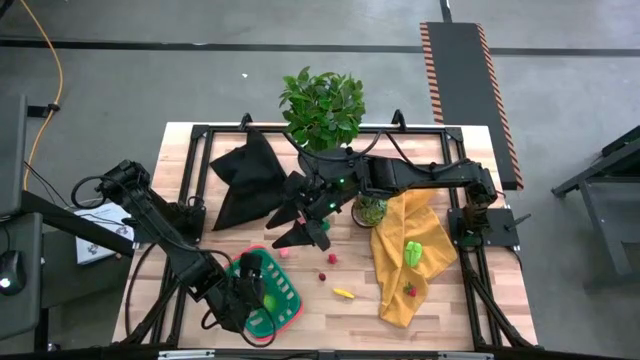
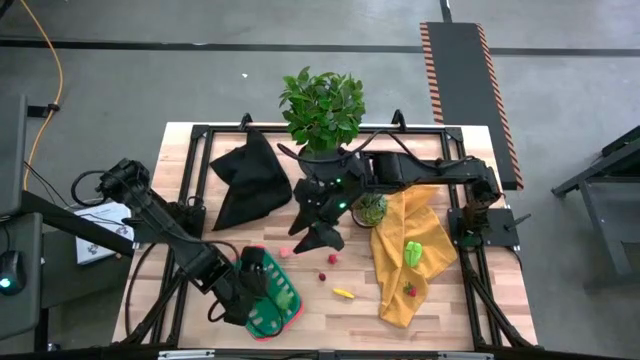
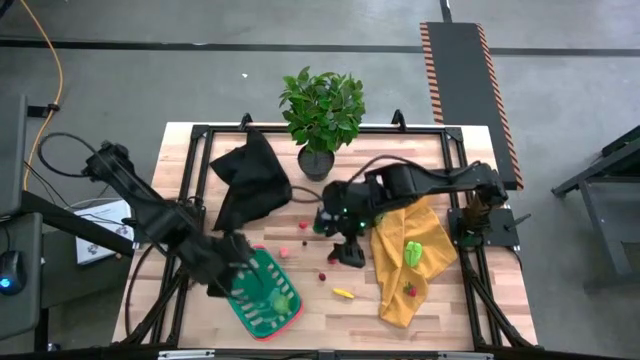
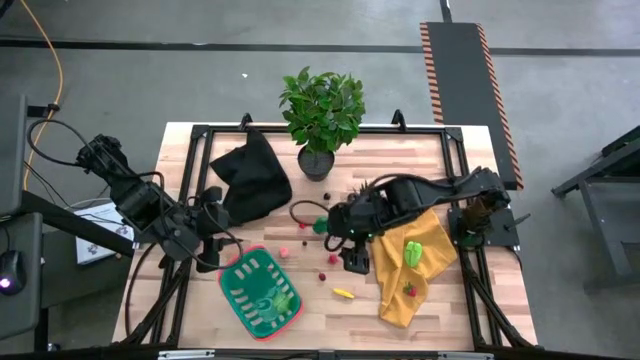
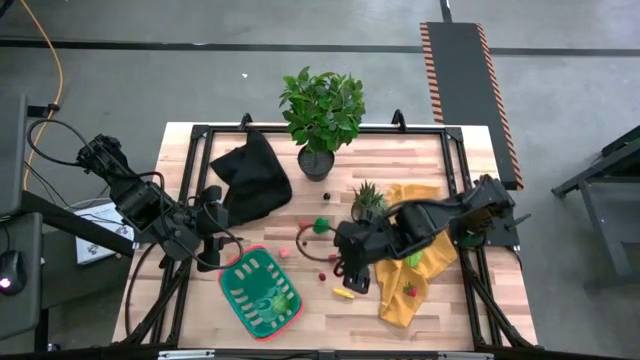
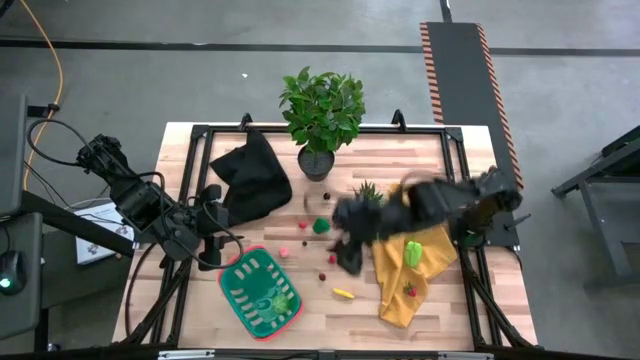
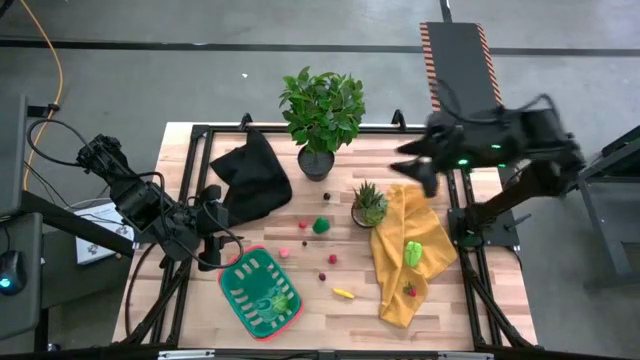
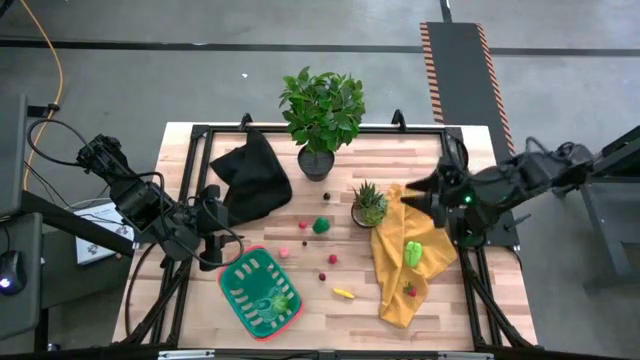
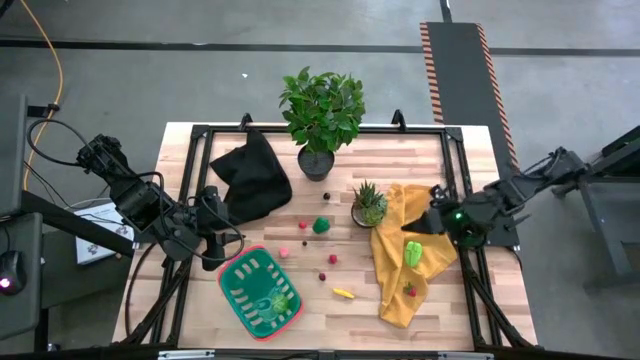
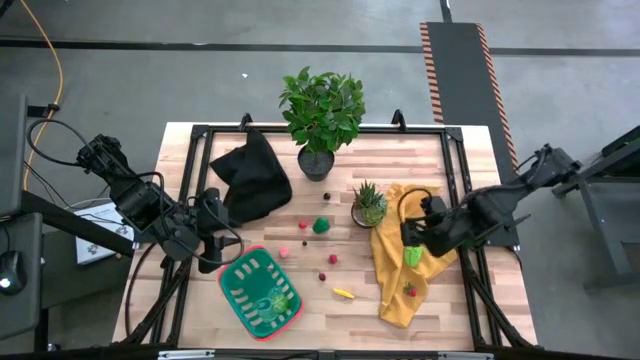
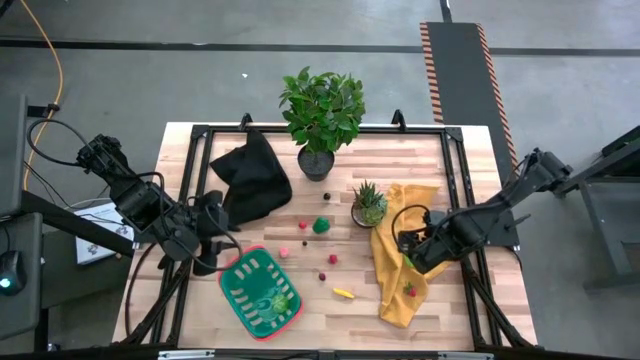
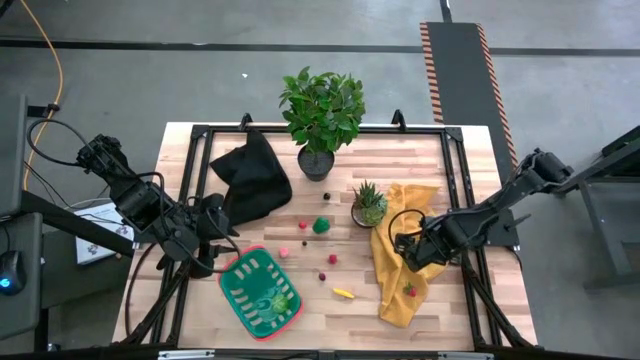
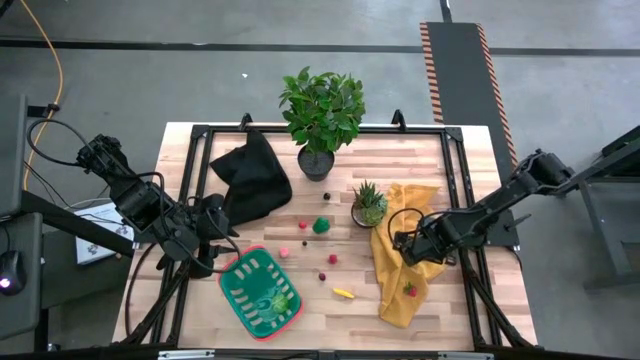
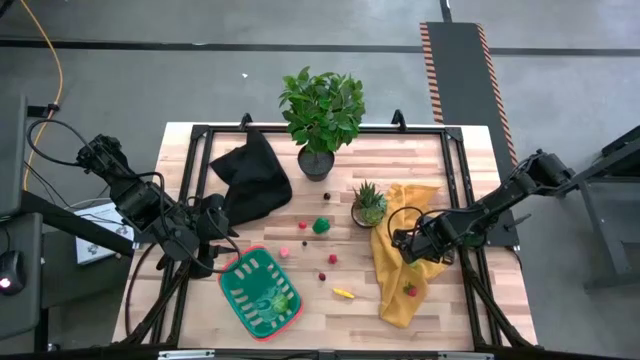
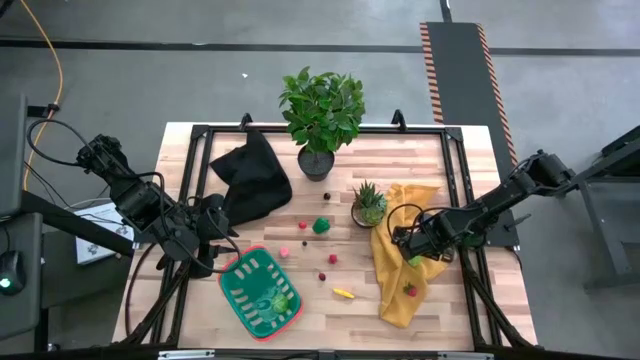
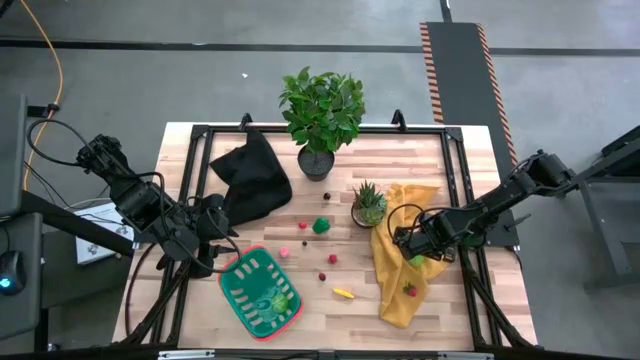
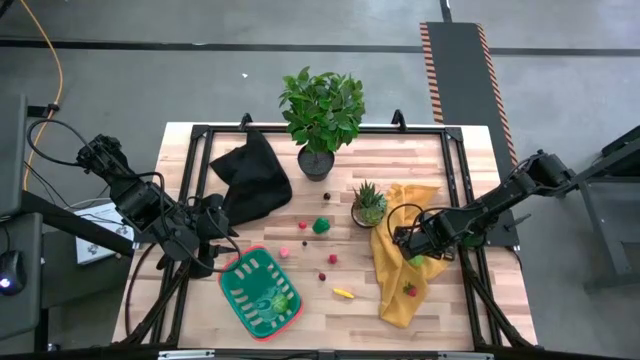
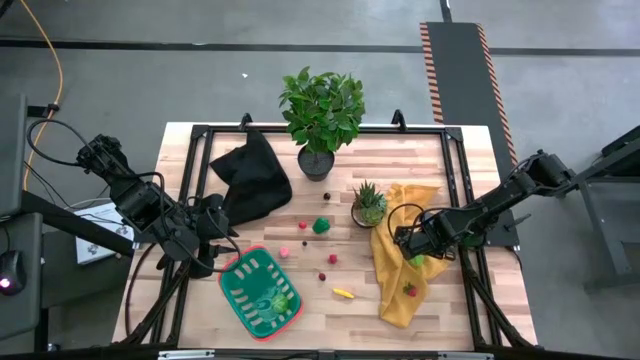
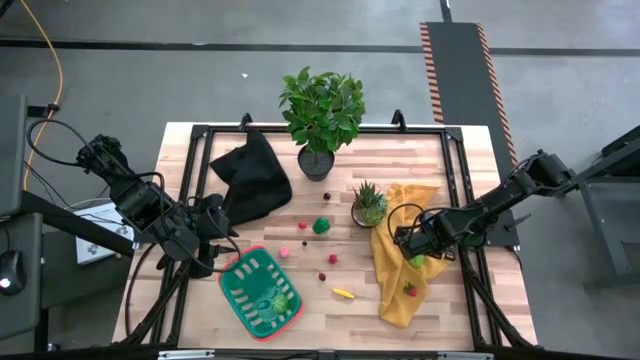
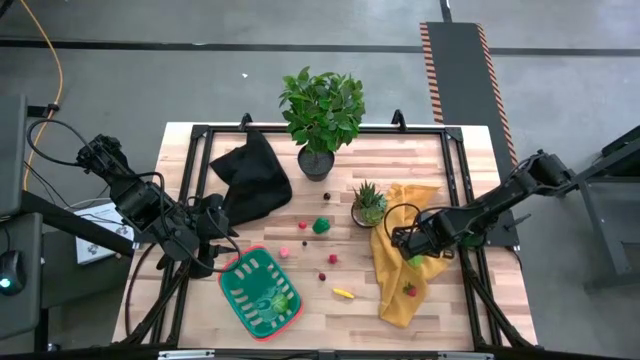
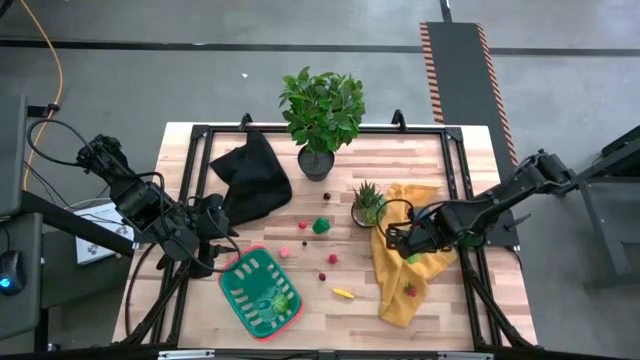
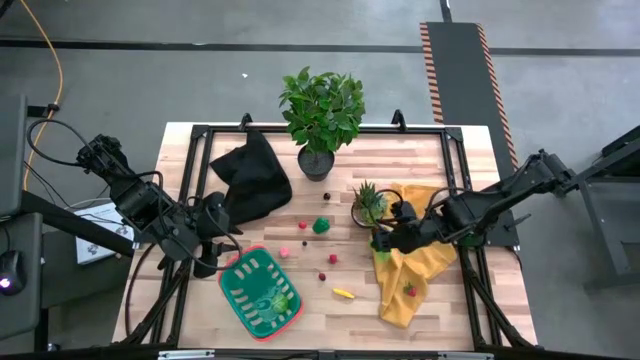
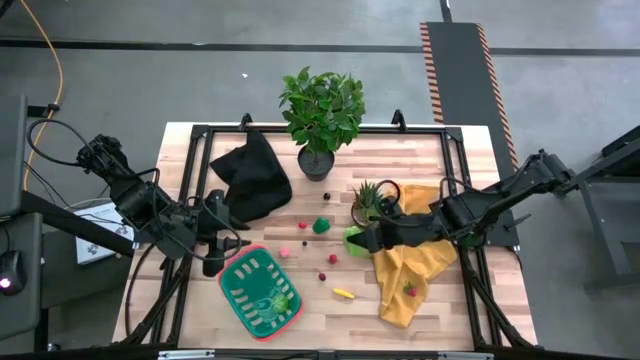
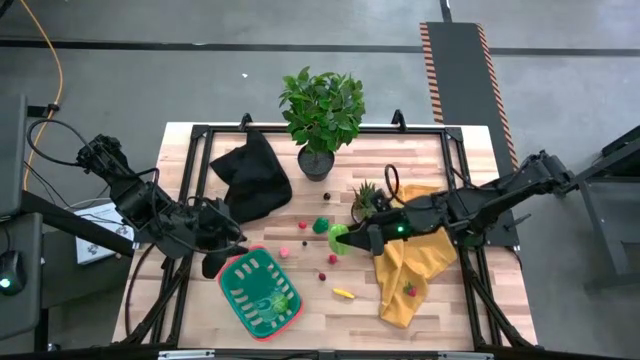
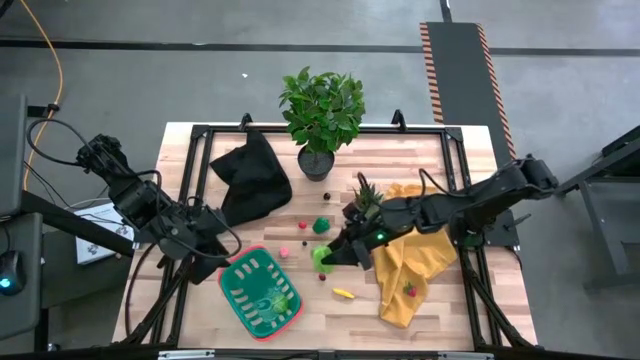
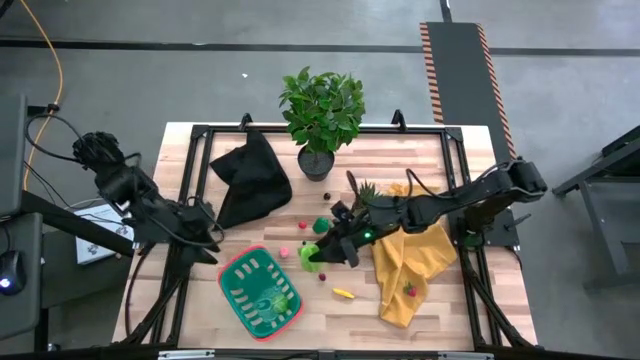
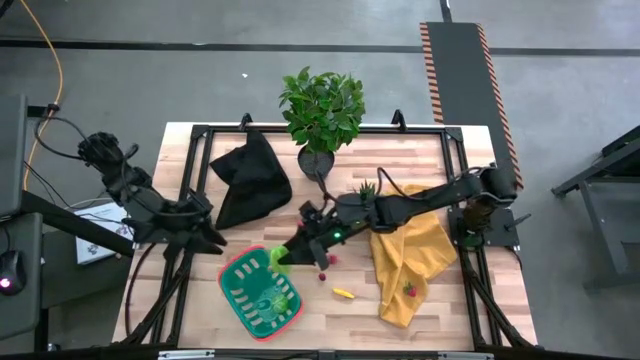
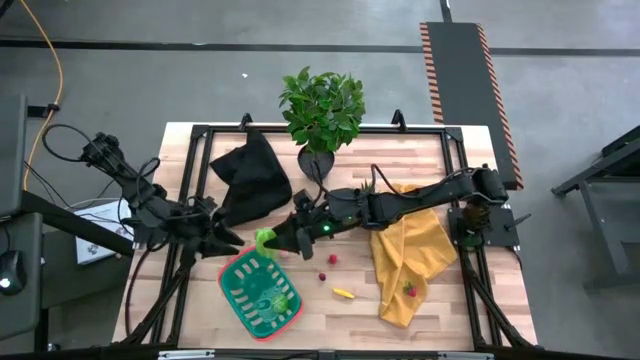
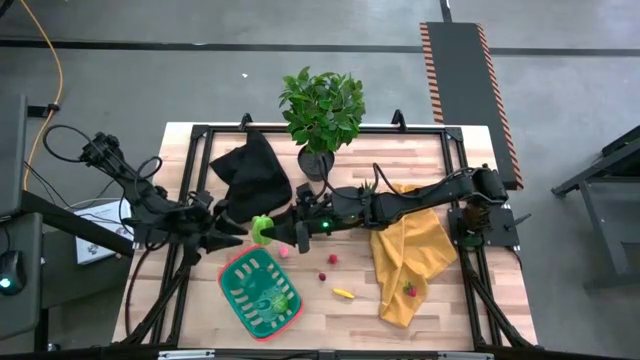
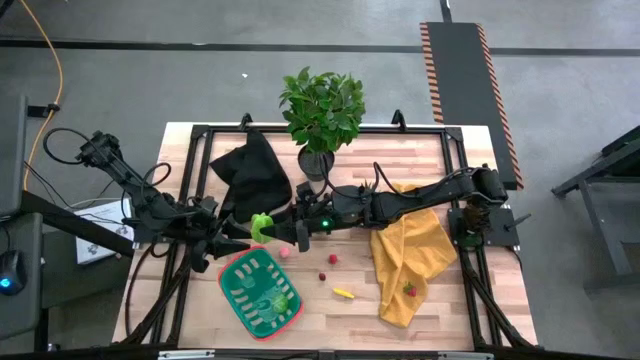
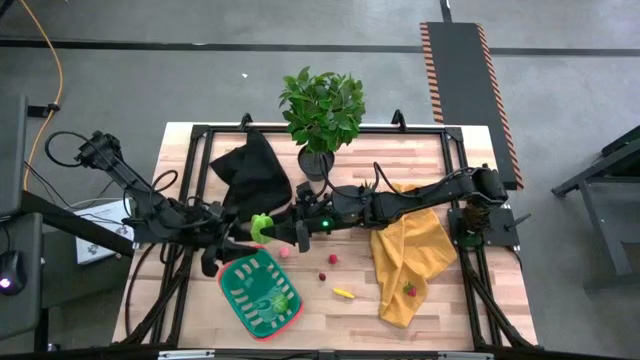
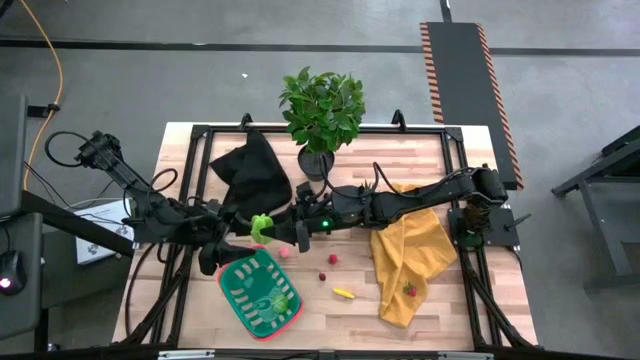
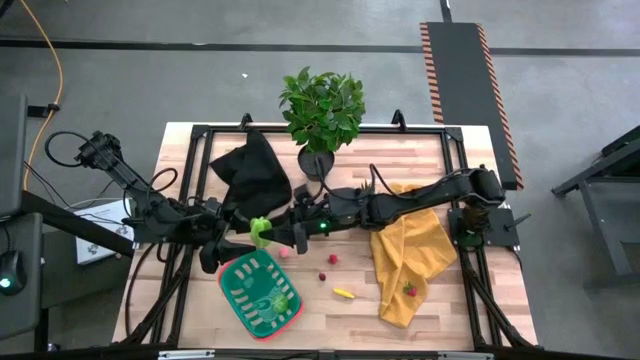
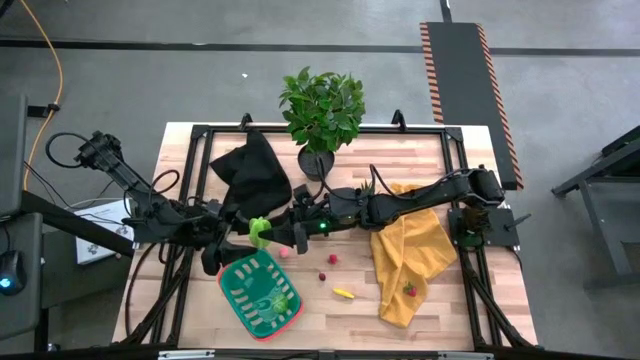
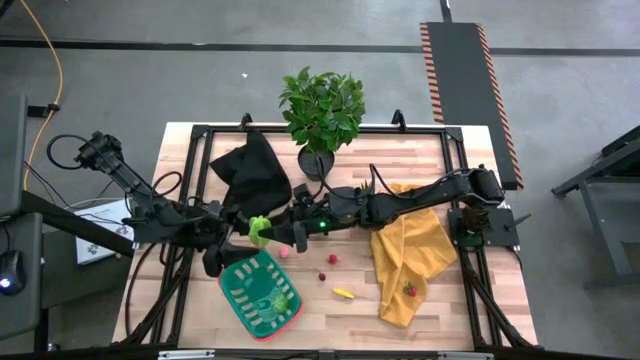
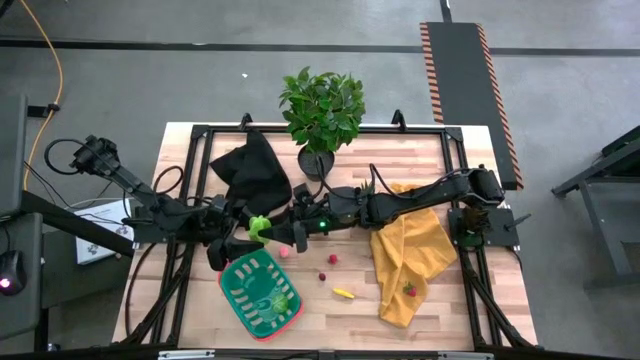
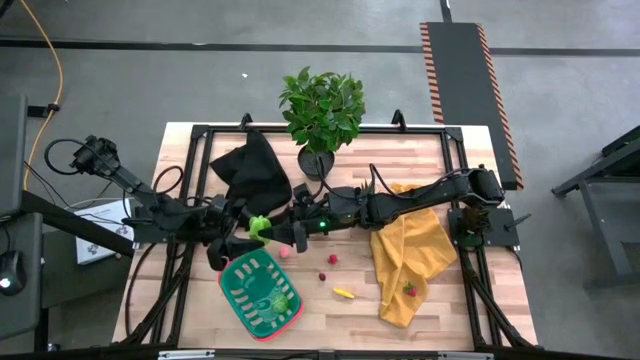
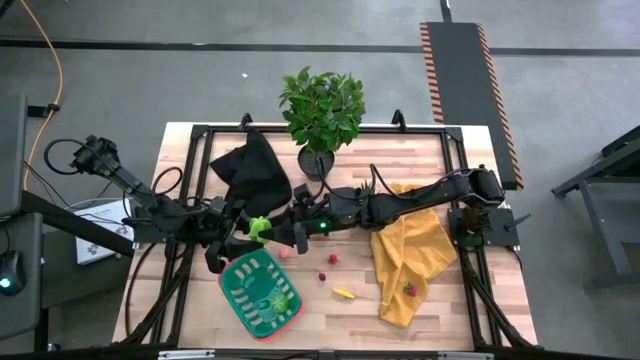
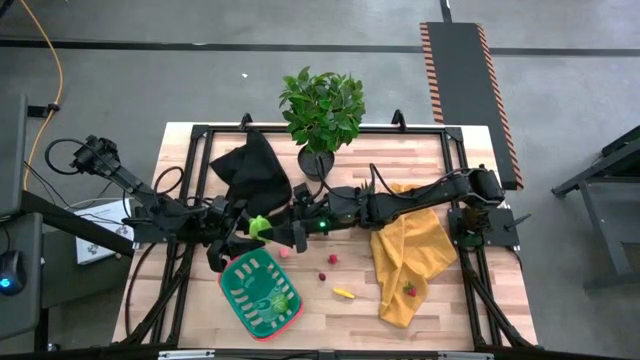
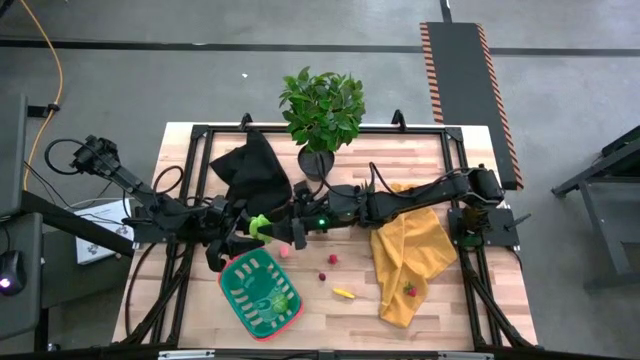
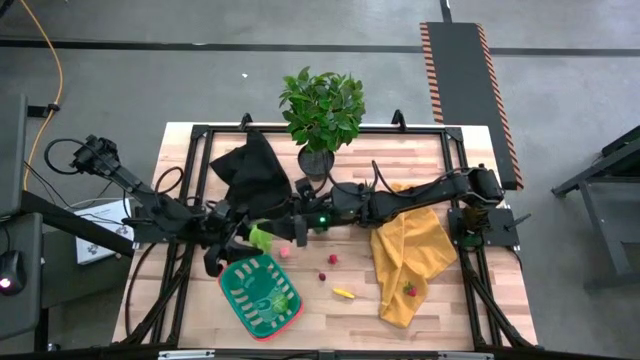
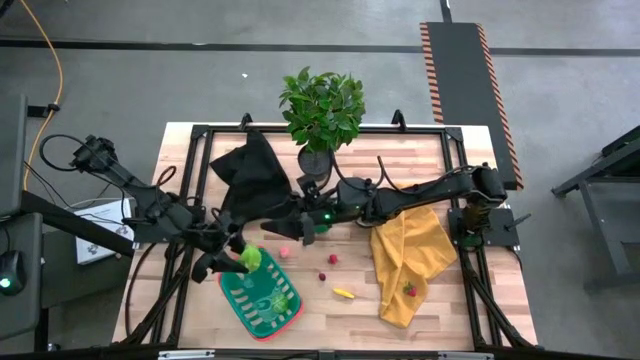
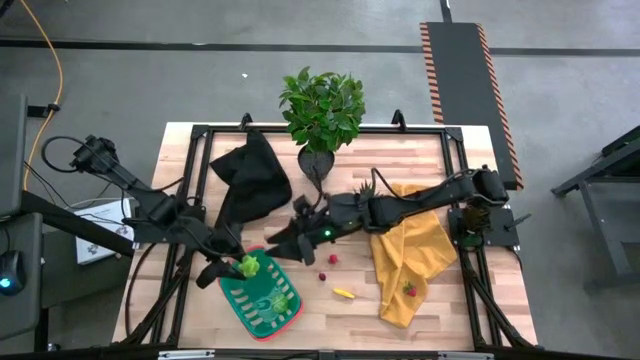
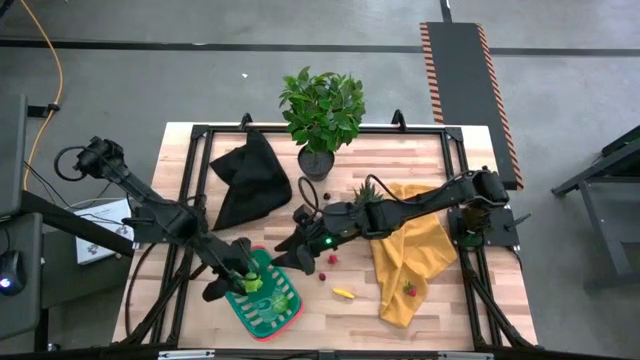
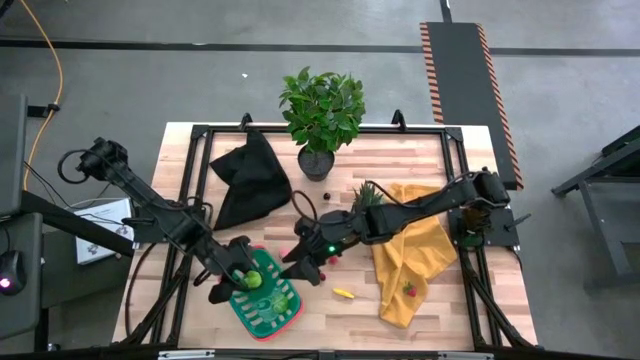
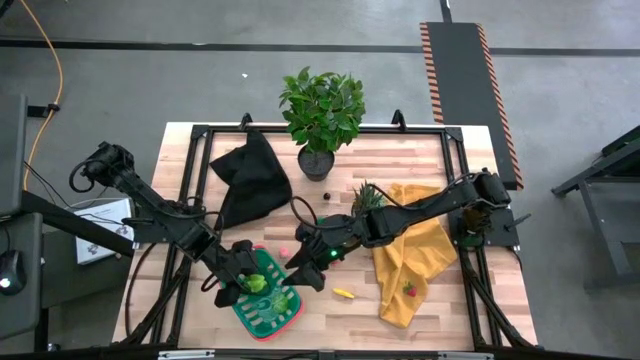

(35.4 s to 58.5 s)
Task: Pick and placing Produce into tupperware
Put the green starfruit into the blue basket
